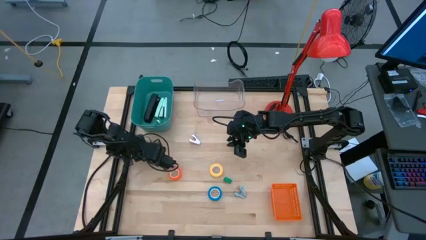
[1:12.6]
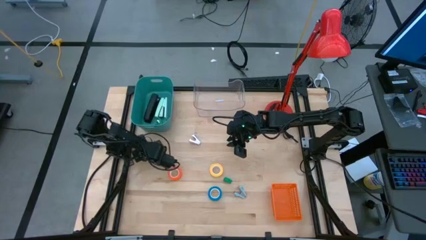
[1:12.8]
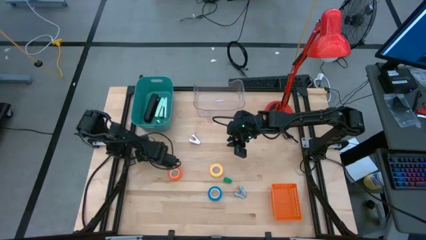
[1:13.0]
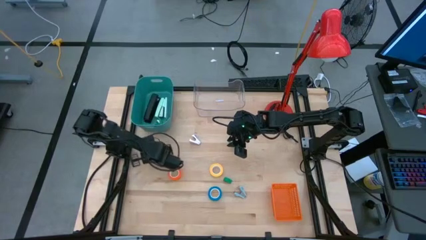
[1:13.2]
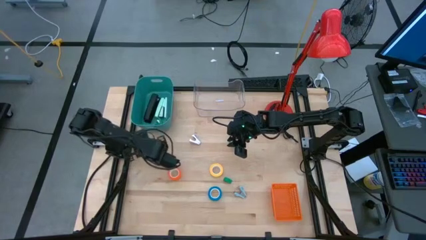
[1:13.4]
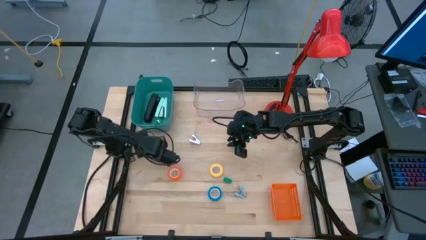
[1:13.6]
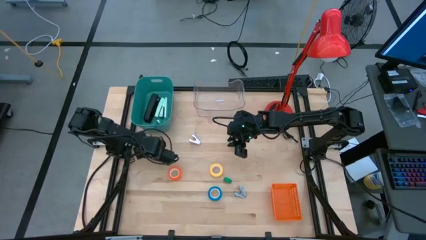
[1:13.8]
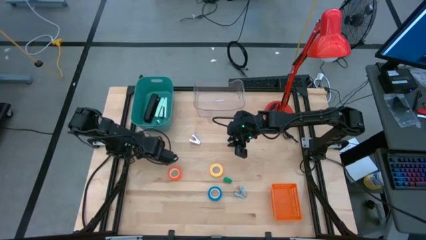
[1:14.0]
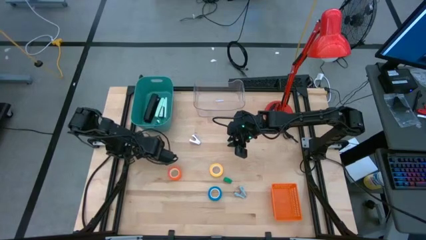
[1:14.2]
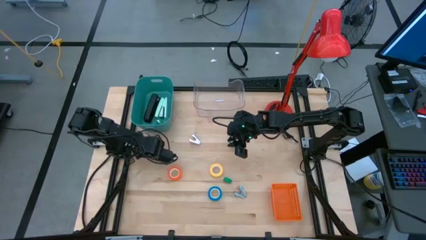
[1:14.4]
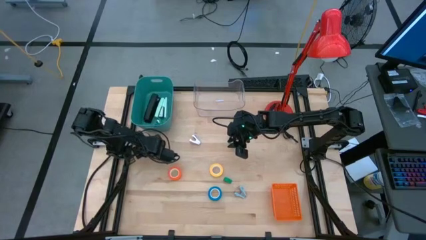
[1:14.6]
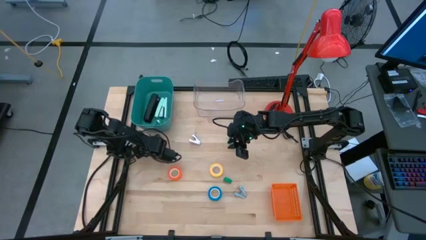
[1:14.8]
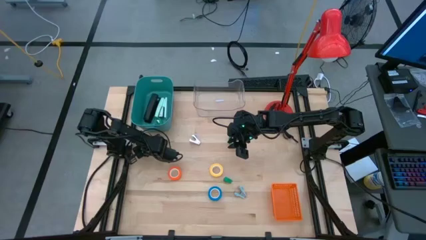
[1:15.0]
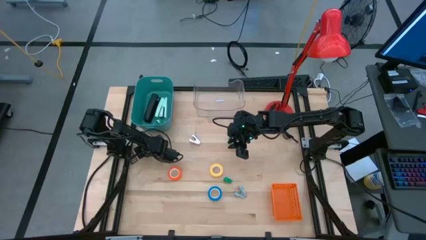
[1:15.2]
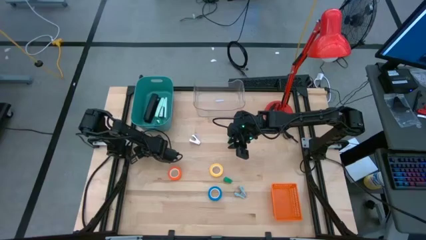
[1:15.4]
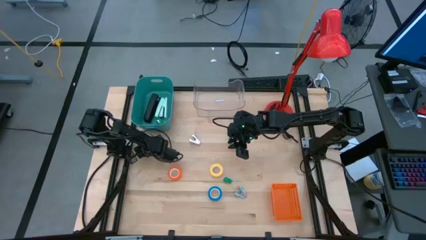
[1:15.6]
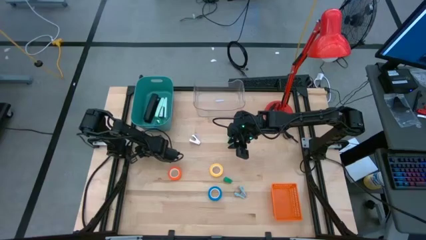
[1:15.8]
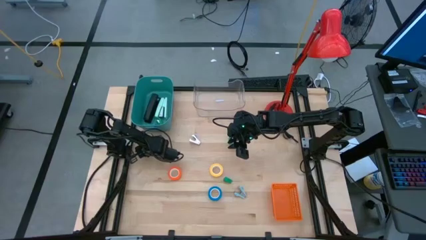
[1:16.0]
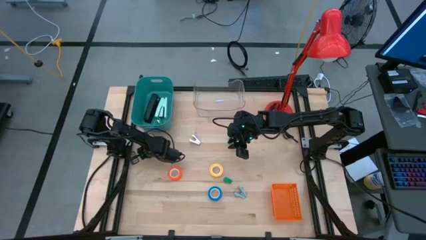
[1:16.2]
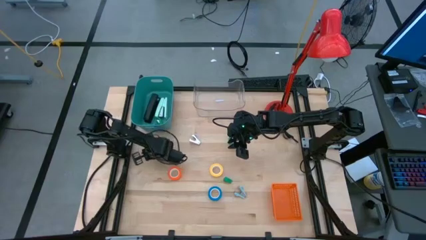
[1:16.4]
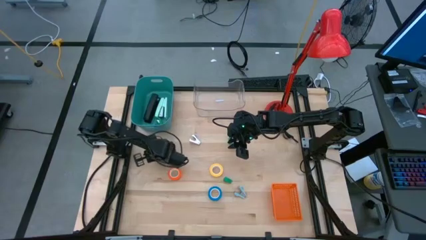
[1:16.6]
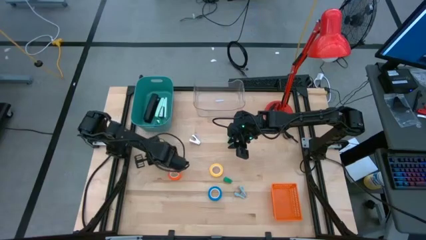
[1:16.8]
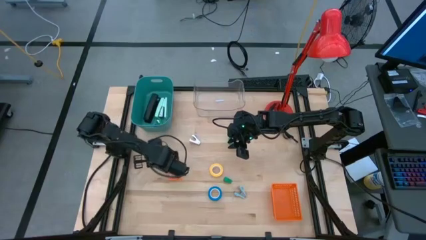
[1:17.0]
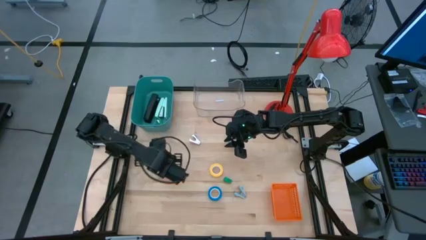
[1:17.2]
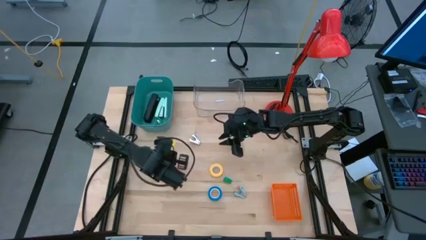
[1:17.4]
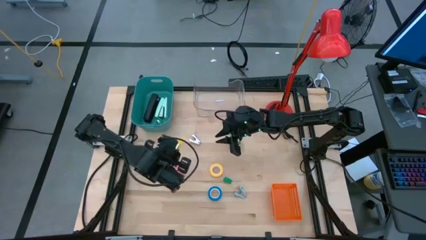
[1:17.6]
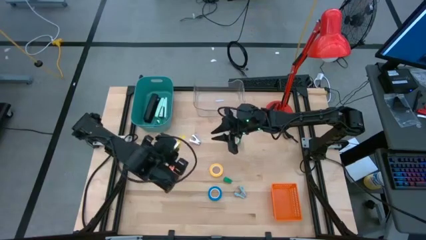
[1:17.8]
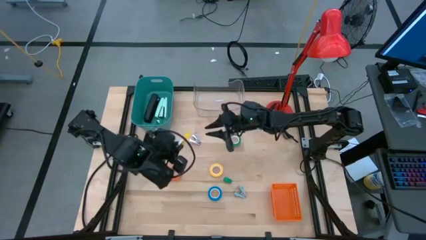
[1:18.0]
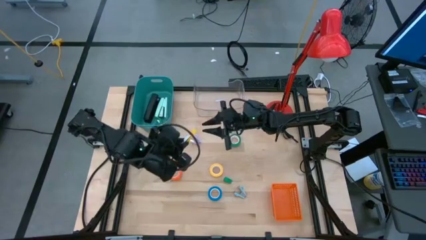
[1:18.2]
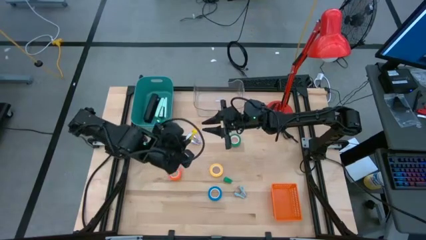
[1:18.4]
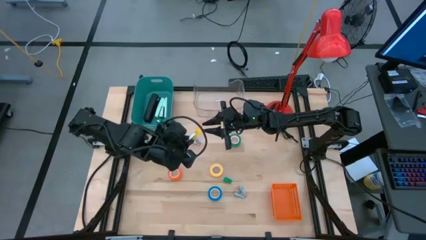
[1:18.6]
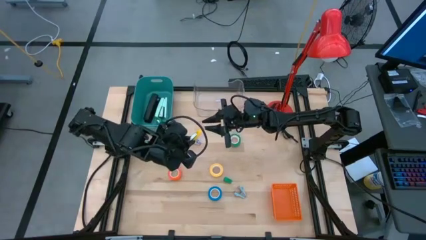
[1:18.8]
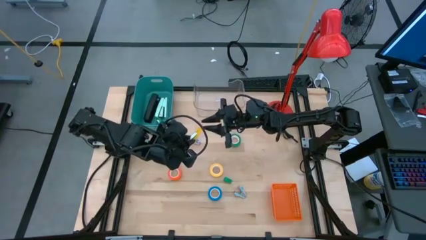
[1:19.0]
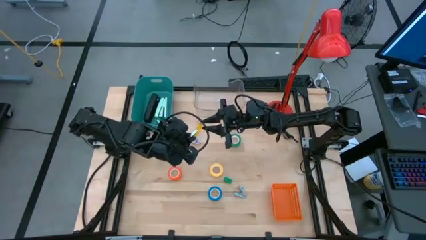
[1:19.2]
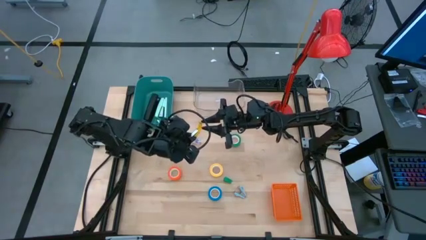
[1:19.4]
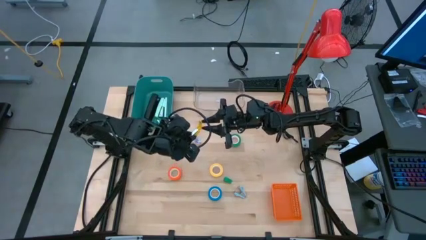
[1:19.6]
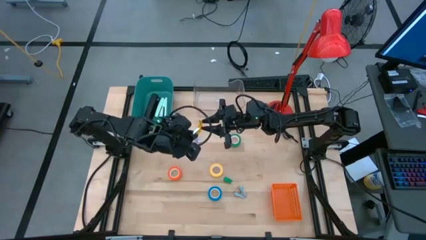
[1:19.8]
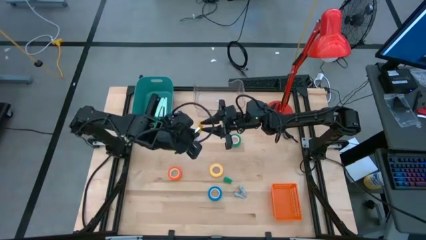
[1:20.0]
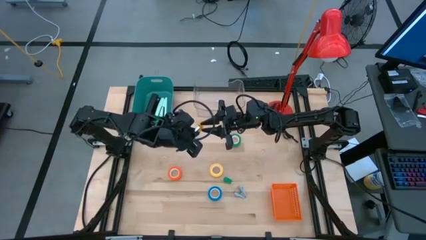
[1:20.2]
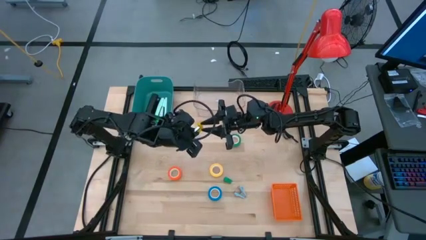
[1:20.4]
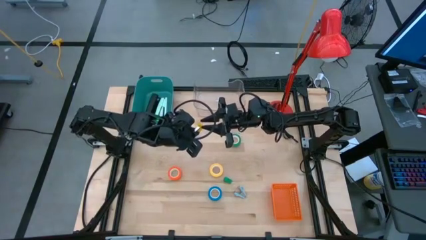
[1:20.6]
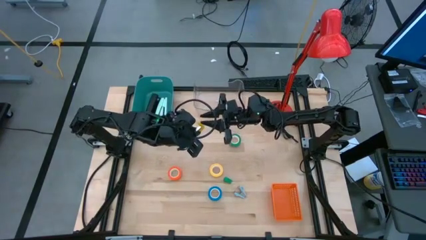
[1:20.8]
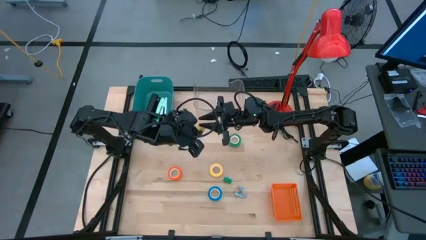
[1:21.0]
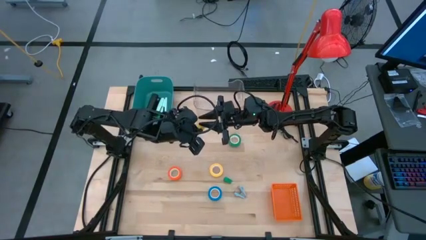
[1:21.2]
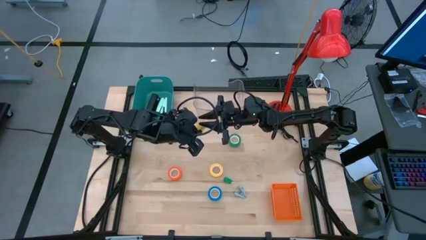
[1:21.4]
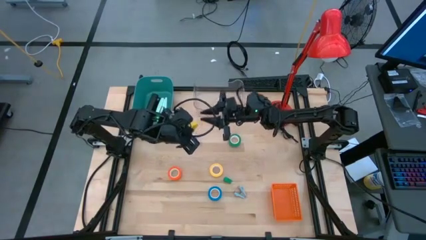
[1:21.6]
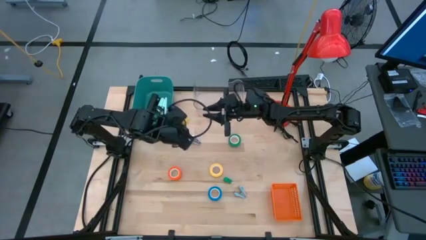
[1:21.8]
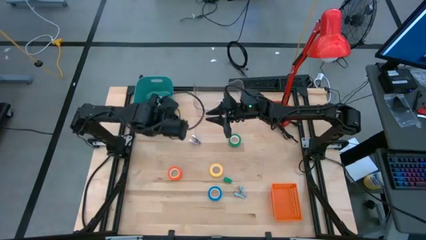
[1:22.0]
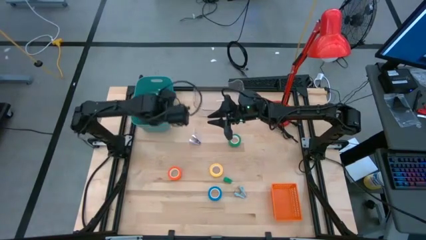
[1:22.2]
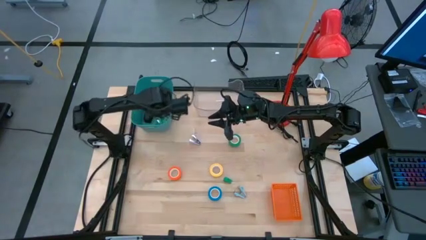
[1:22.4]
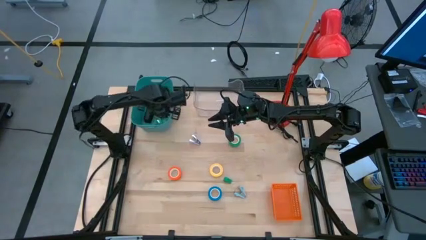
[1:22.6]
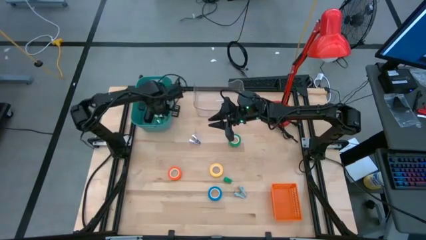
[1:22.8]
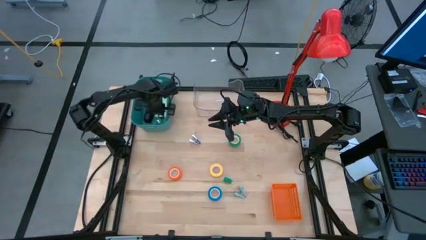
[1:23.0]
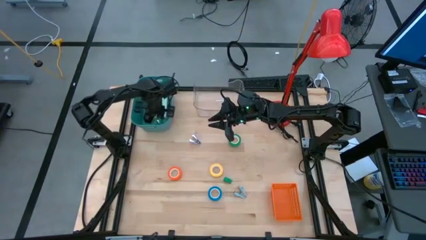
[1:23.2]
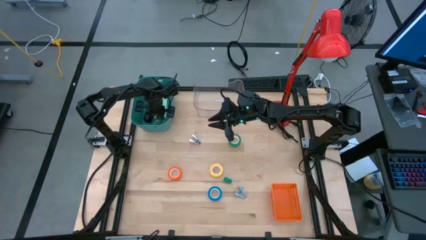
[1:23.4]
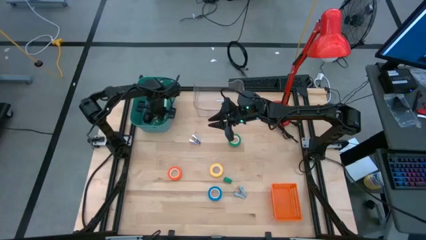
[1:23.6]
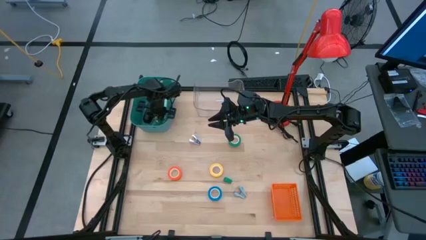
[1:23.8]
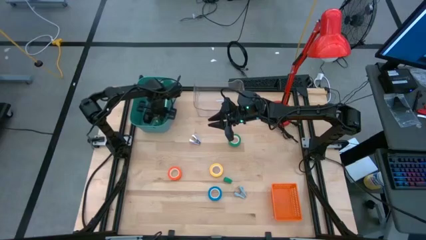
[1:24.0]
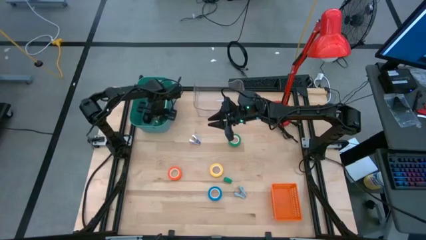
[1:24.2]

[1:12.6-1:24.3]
Task: Pick and place Stapler, Stapler remover, tape
Put the small yellow stapler into the green bin

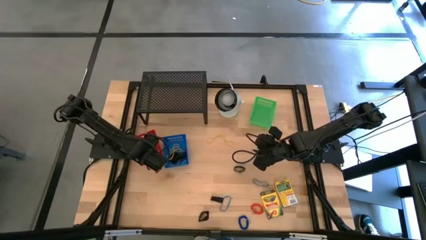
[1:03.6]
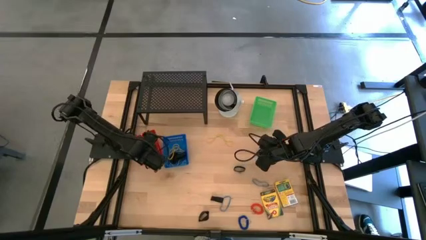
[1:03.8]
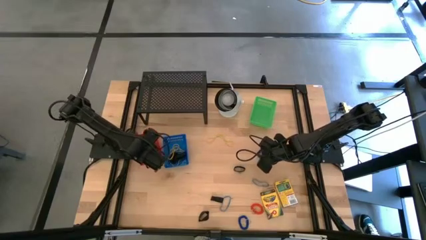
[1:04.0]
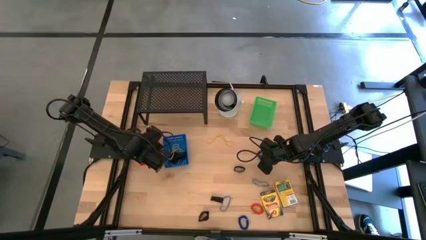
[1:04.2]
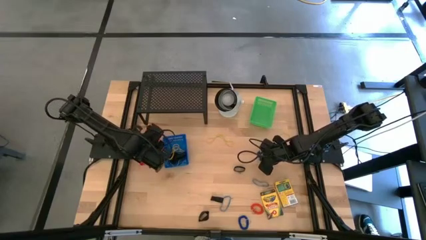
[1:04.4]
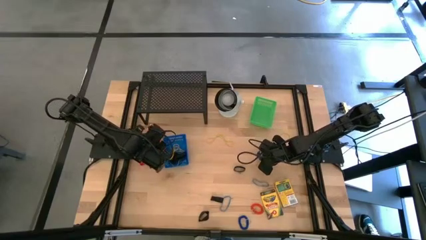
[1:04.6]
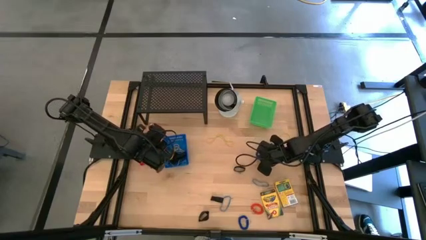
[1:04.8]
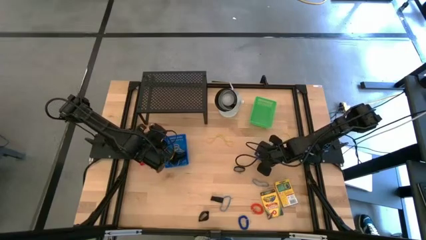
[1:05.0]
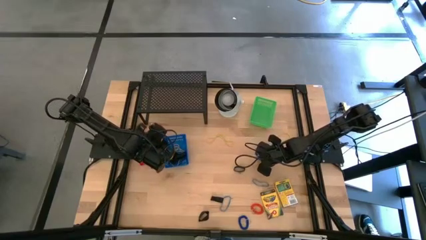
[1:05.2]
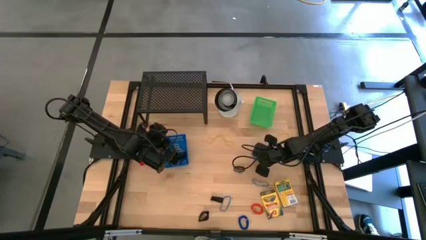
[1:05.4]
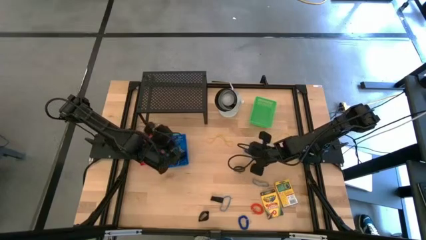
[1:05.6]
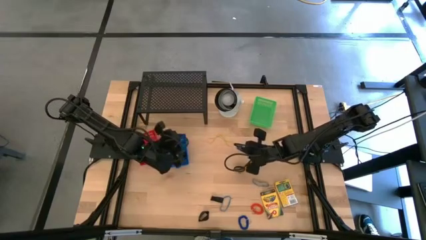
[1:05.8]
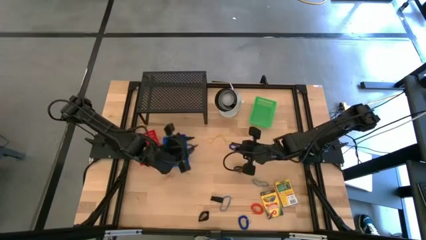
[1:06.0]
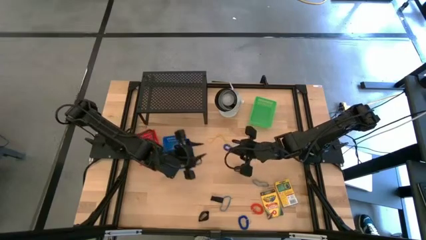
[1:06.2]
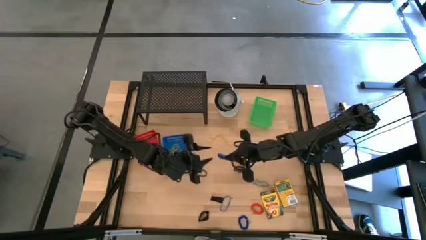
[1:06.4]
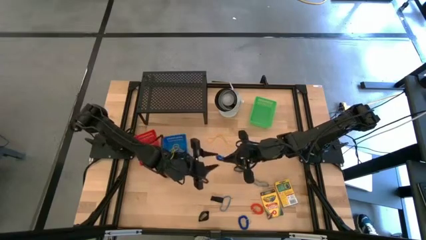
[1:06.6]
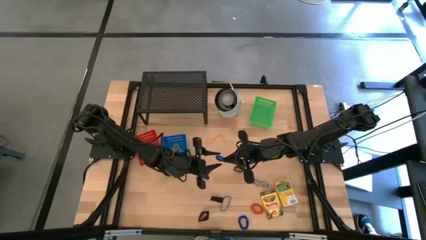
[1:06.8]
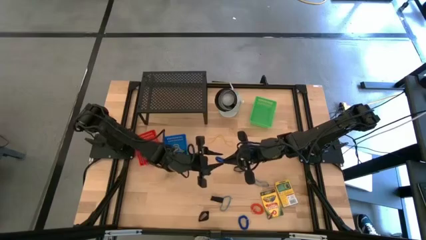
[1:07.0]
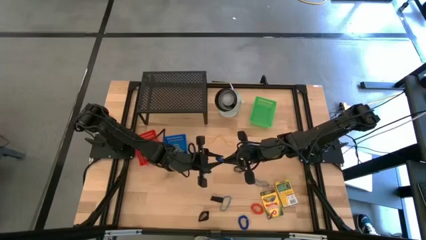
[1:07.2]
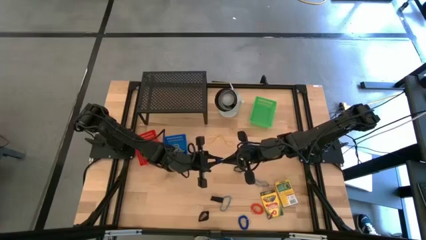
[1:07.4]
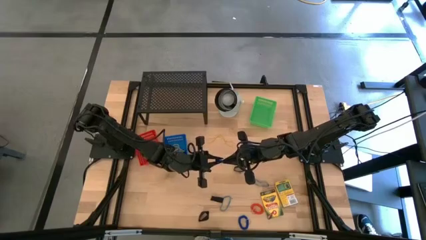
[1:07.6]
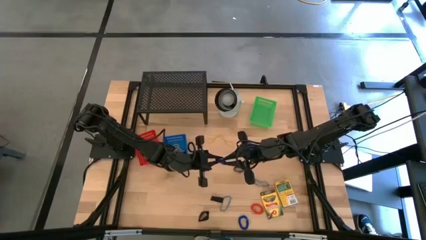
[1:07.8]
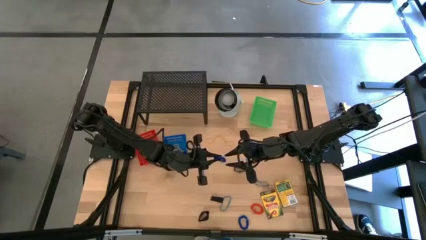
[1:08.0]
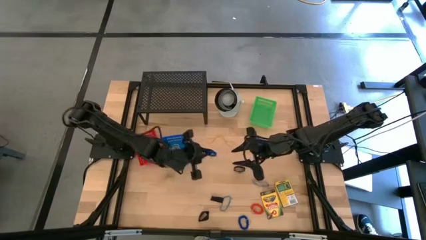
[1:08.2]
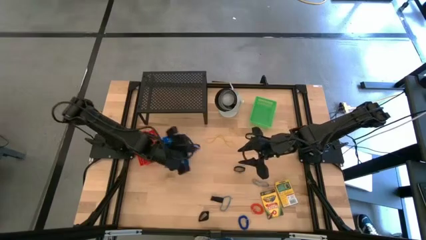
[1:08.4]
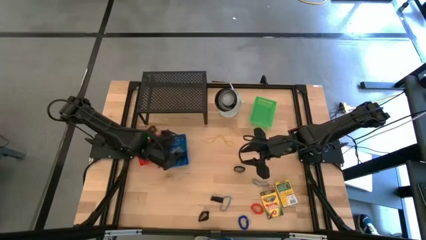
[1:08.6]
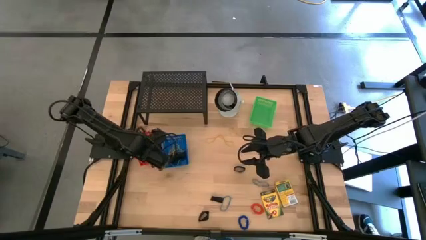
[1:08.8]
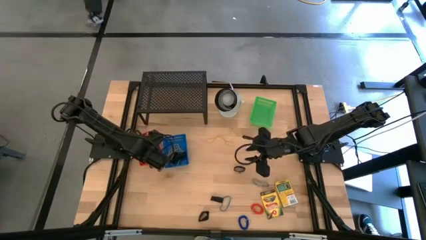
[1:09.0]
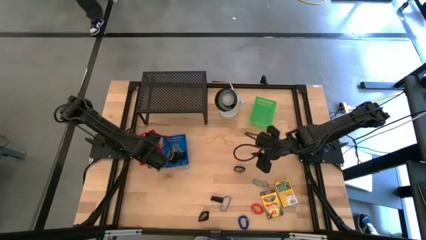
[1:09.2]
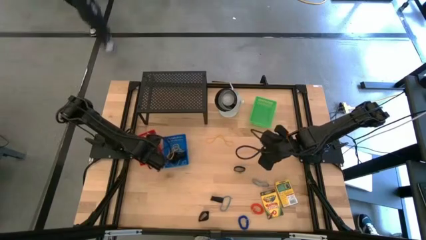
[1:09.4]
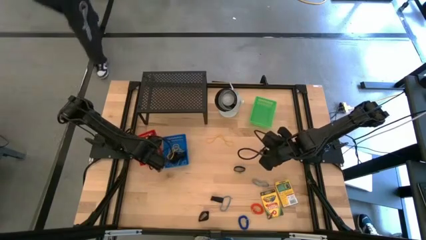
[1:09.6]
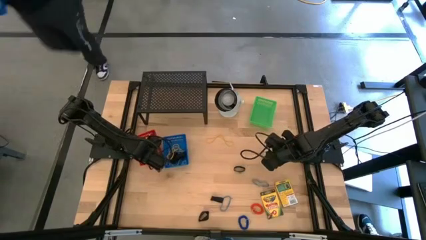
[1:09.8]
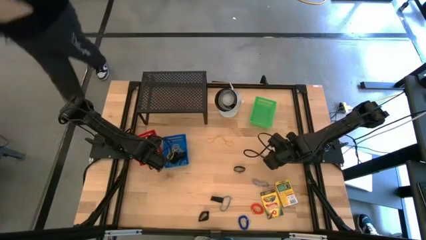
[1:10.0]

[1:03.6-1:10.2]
Task: Pick & Place Office Desk Supplies
Put the blue spring keychain into the red bin
